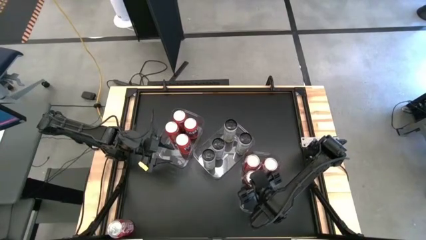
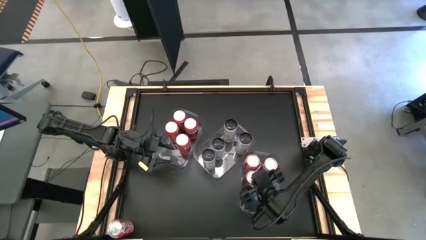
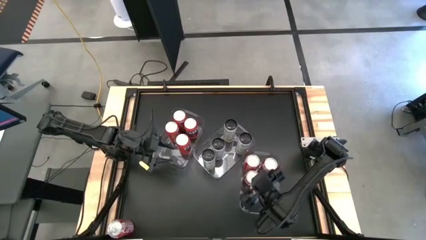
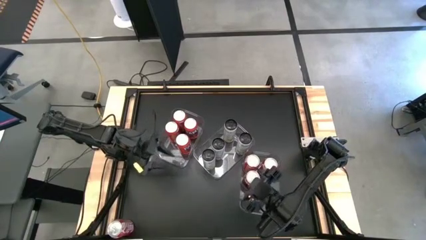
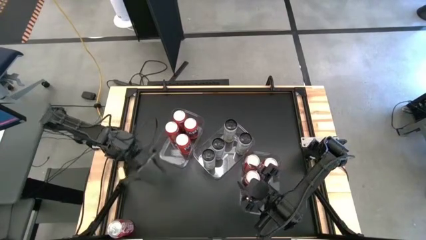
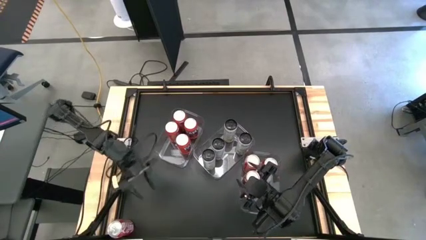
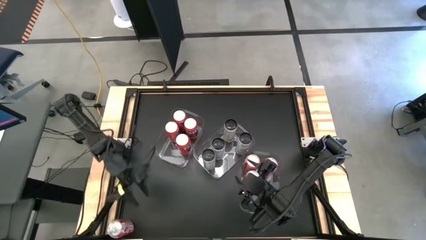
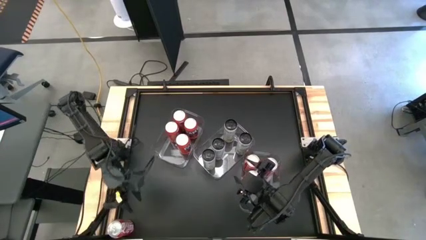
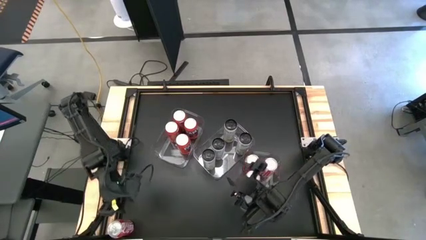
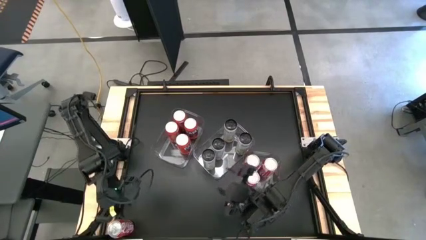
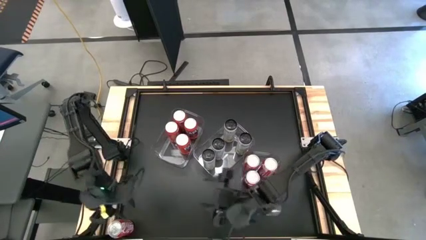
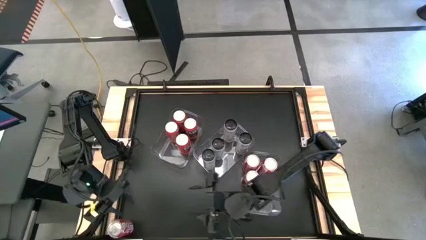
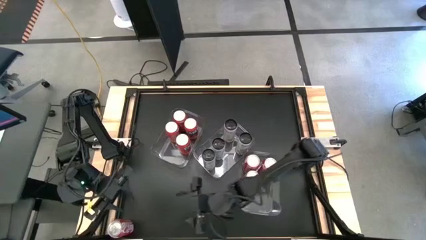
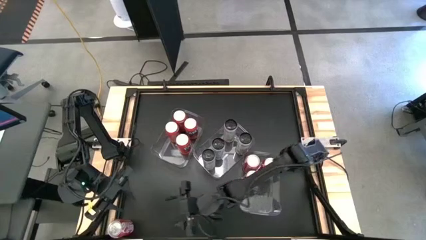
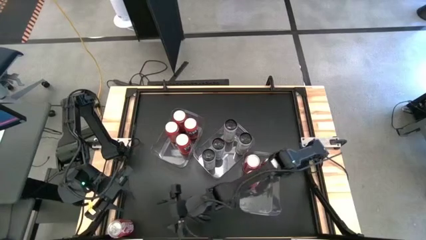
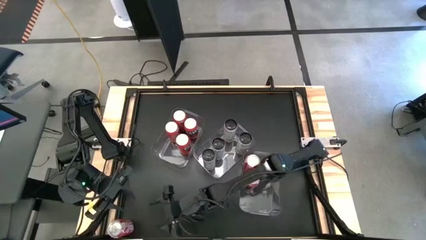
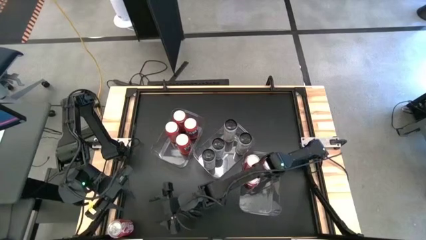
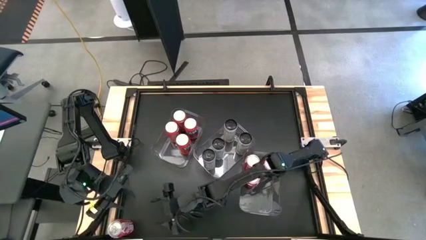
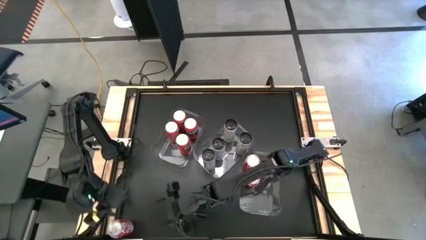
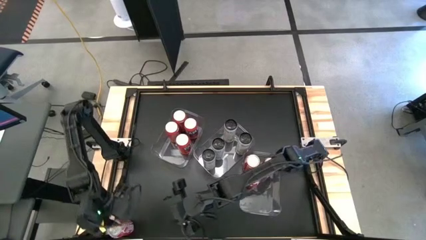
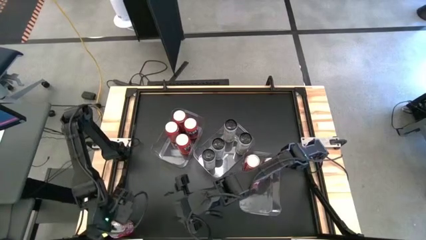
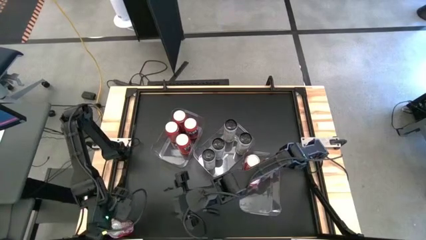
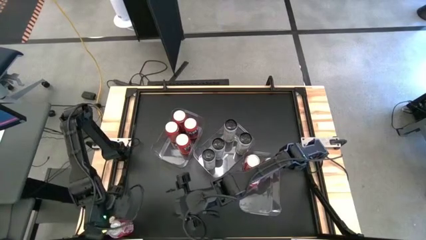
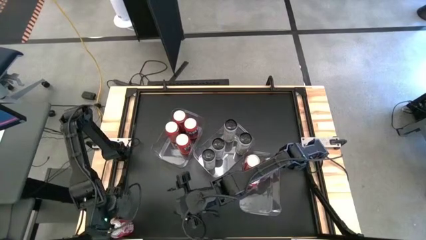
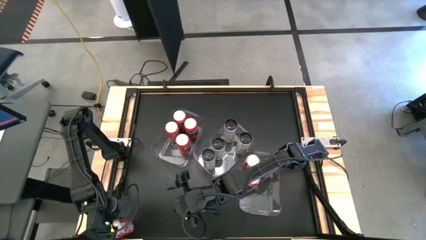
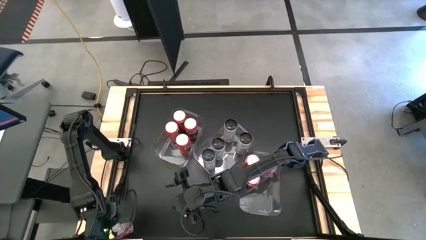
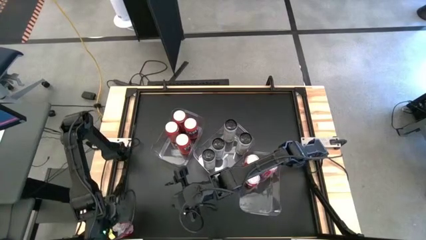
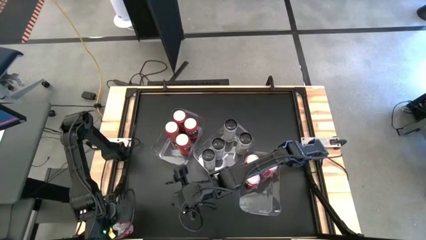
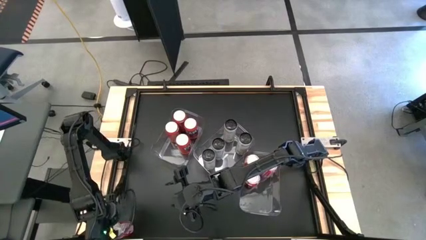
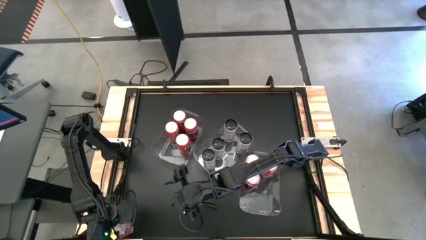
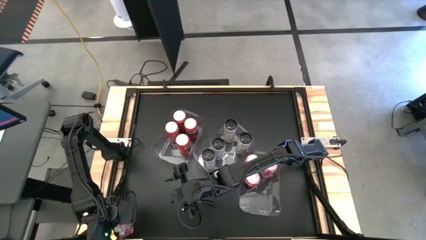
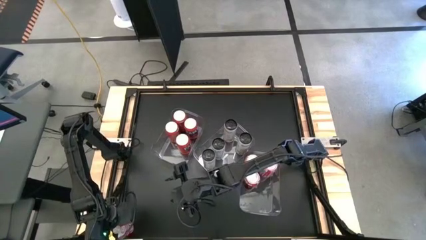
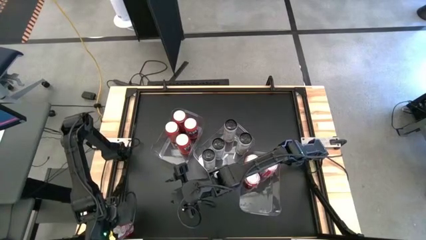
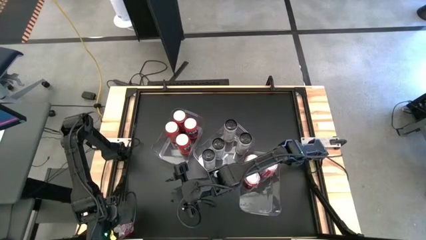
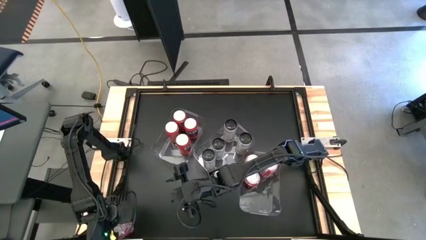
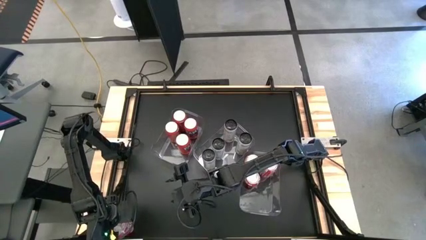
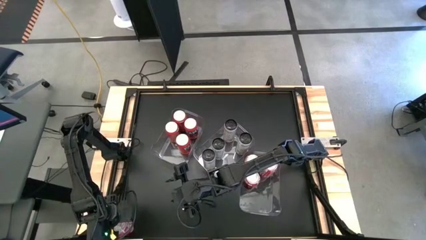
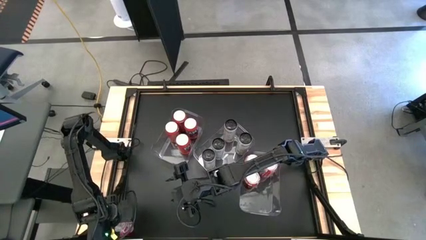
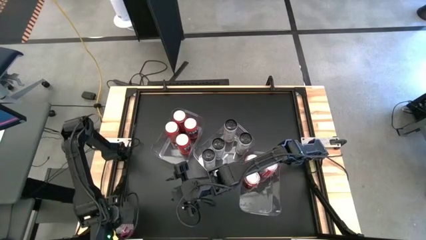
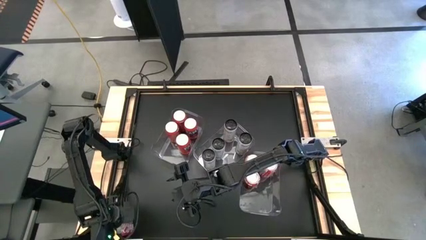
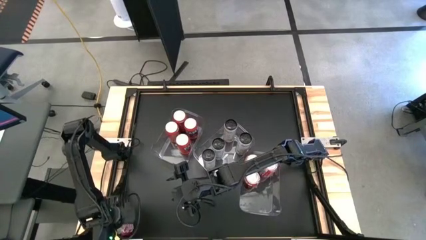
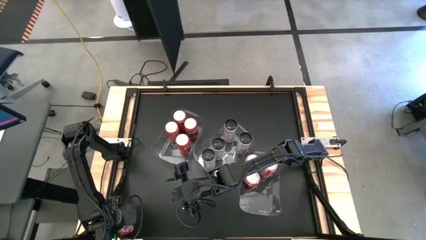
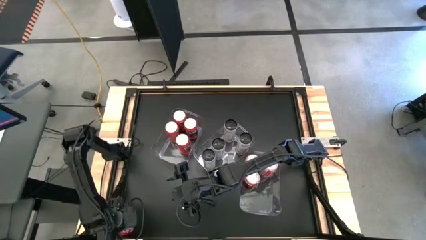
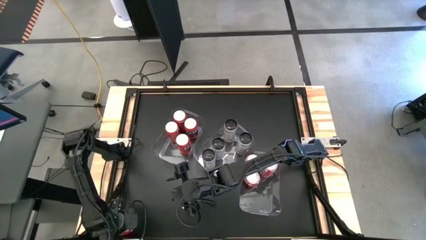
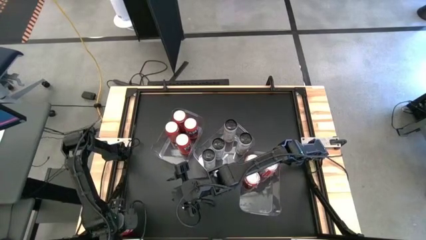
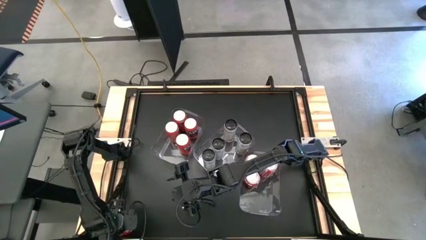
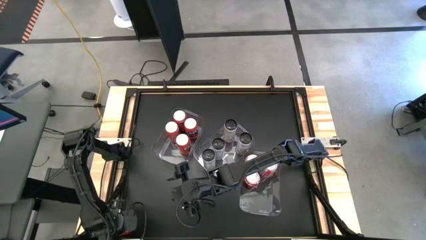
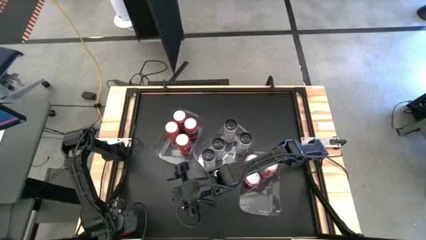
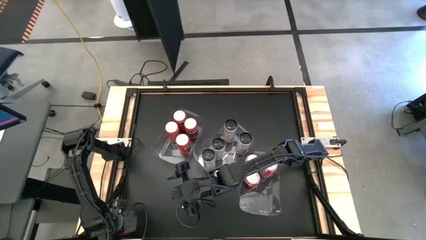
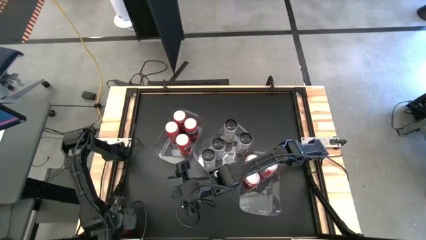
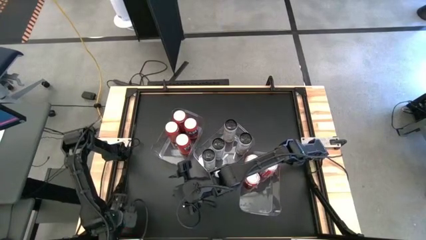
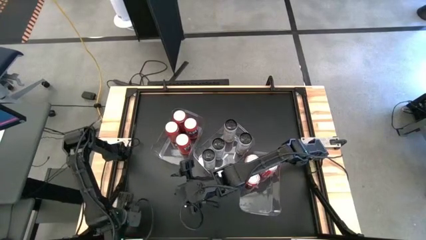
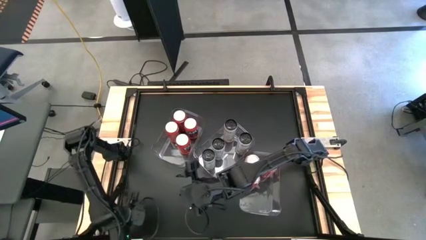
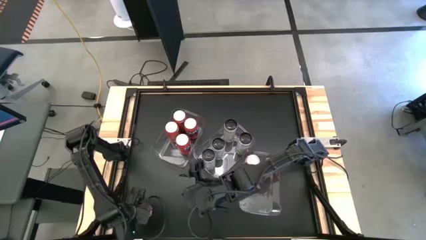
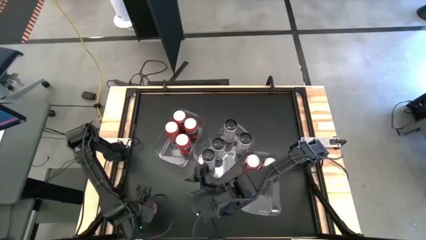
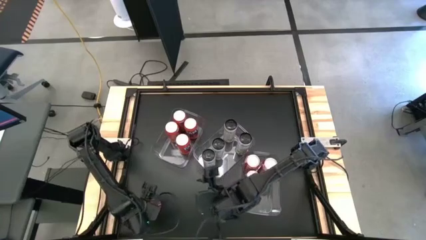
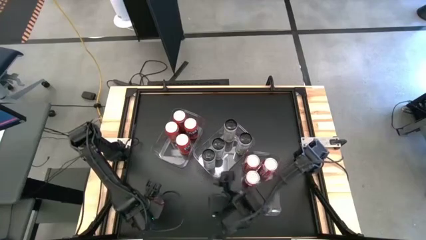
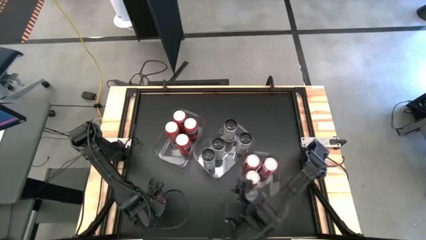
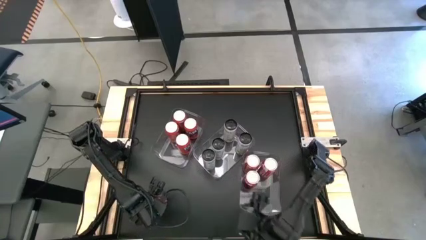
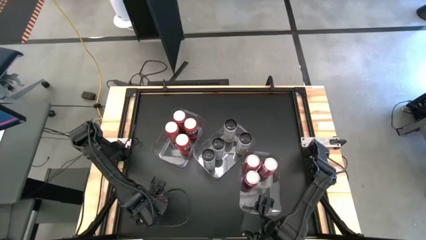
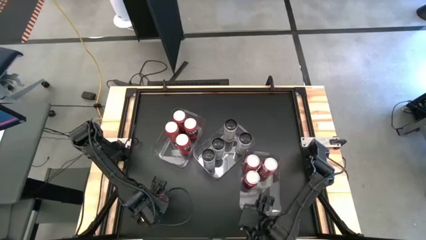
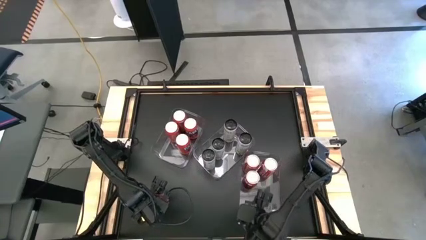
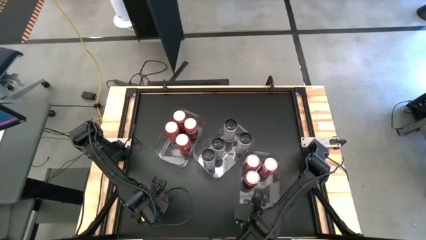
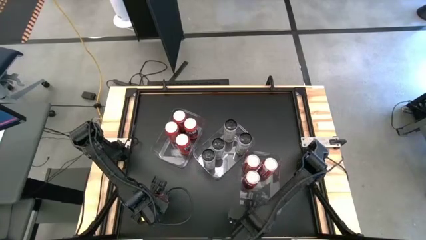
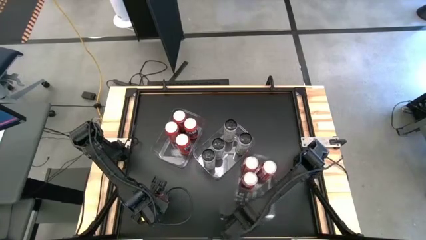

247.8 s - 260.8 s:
Task: Sort soda cans
Put the red soda can into the right transparent bin

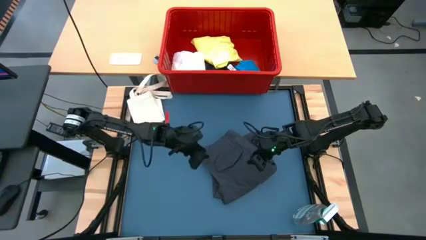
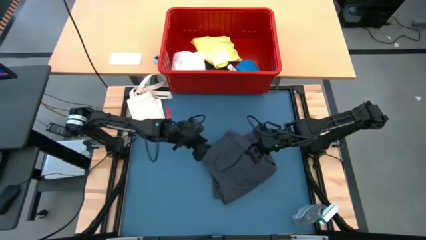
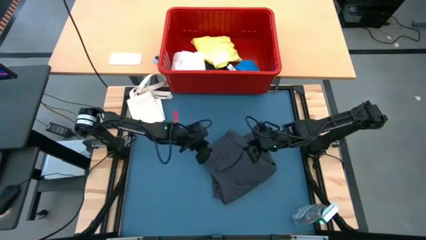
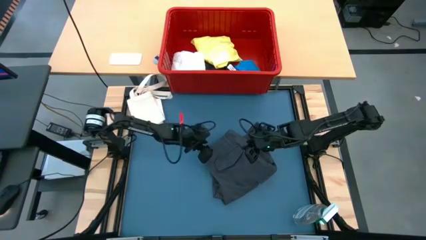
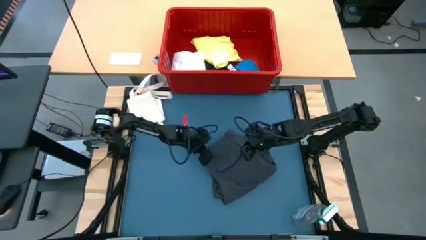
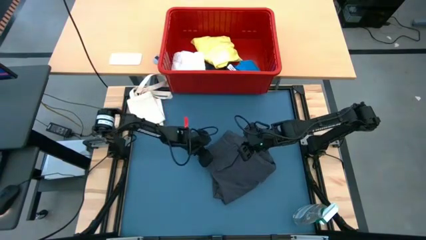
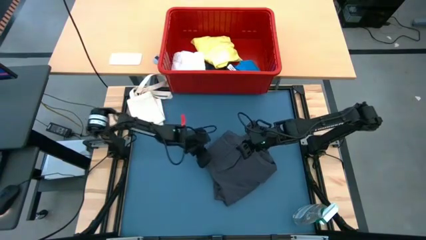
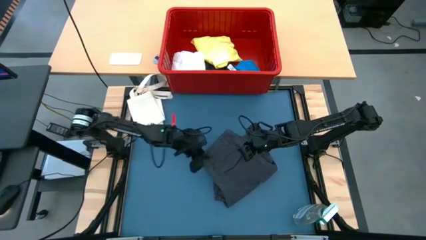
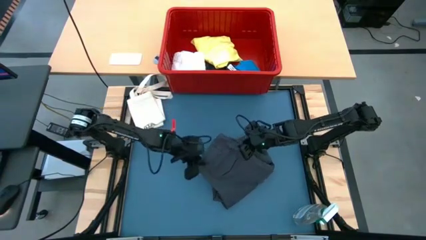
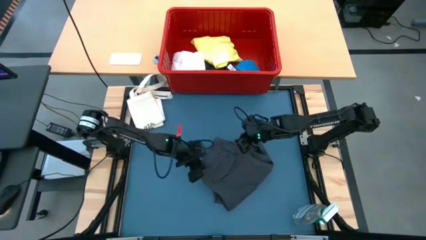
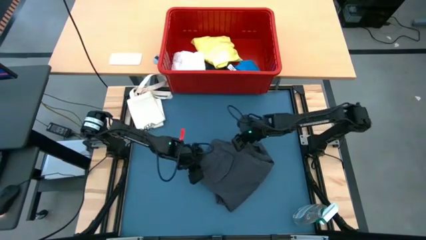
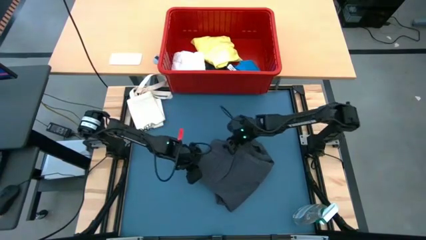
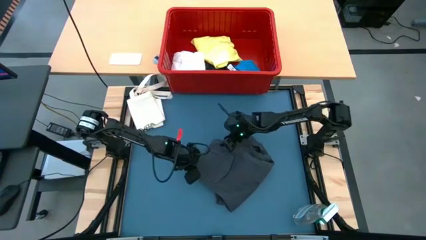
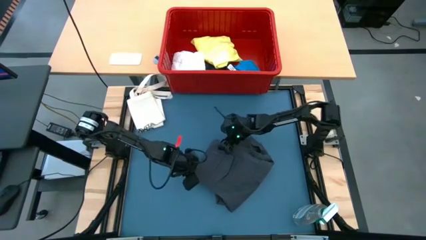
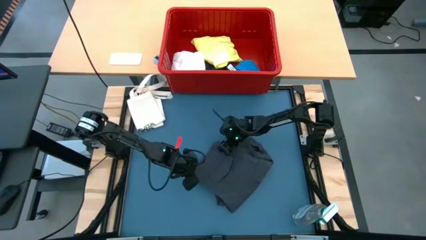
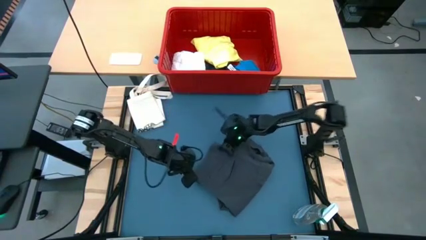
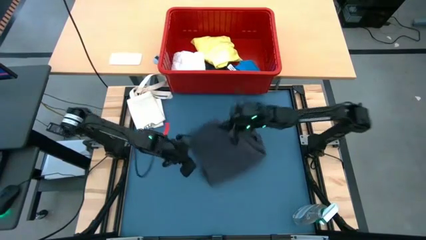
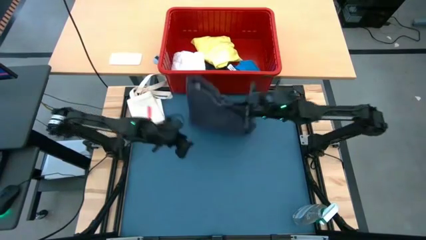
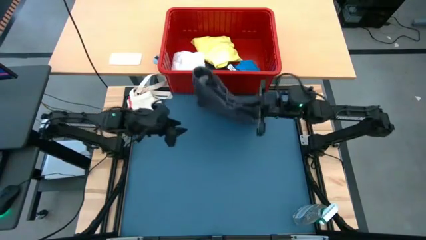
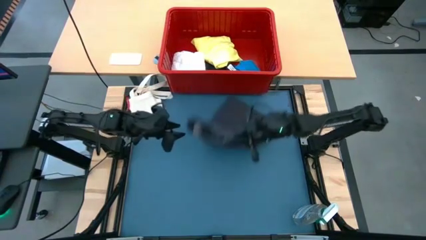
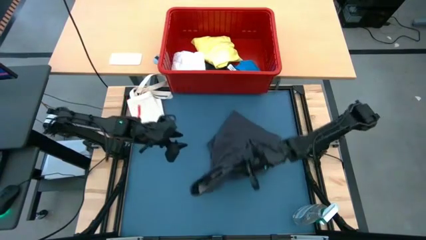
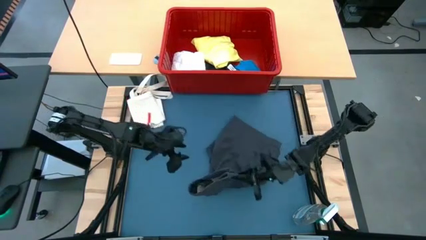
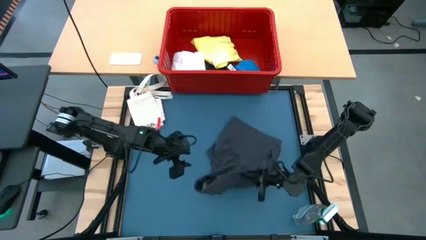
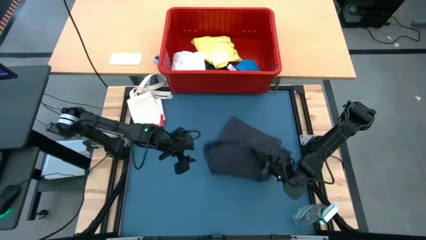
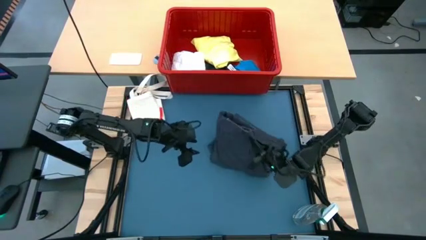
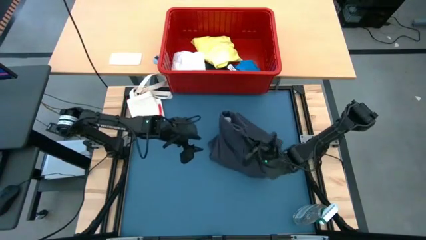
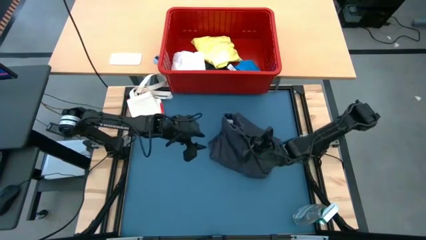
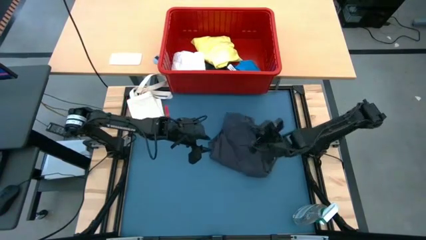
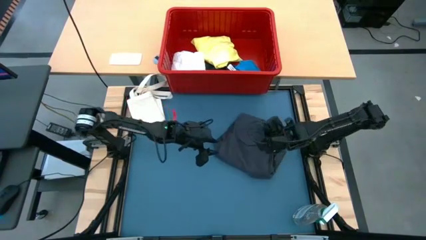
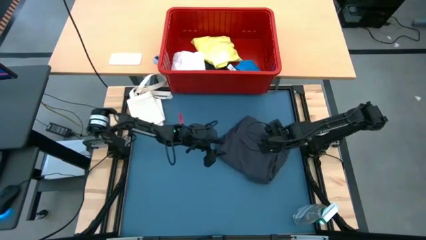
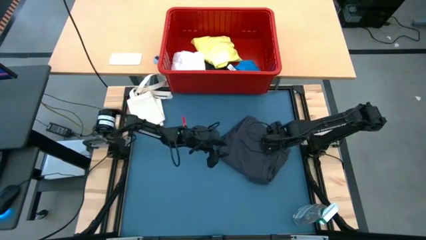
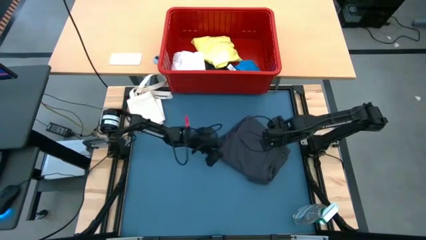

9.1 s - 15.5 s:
Task: Fold laundry
Fold the gray shorts
